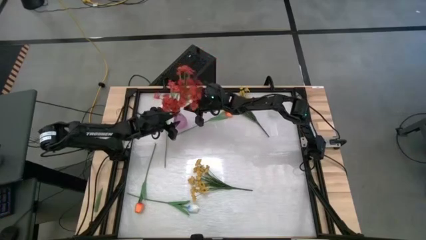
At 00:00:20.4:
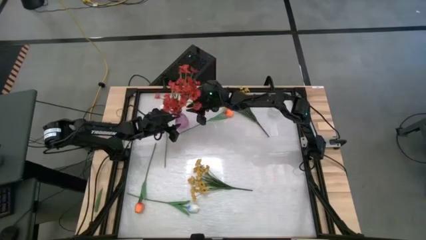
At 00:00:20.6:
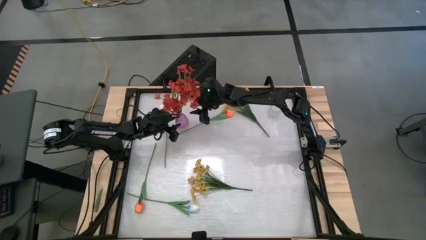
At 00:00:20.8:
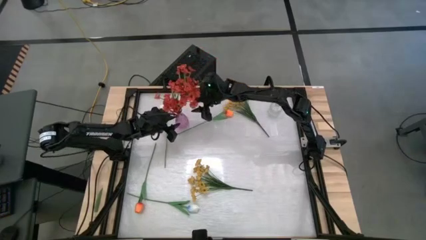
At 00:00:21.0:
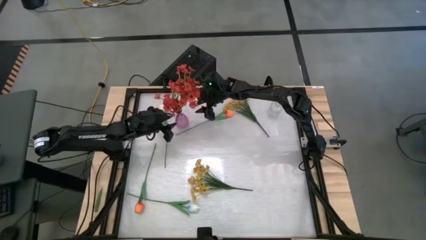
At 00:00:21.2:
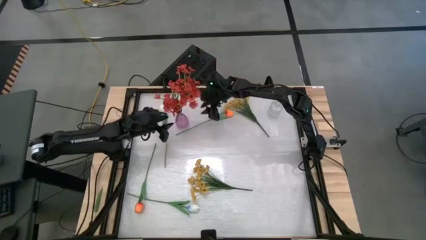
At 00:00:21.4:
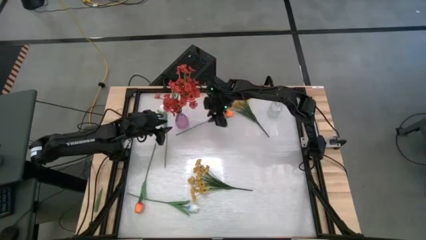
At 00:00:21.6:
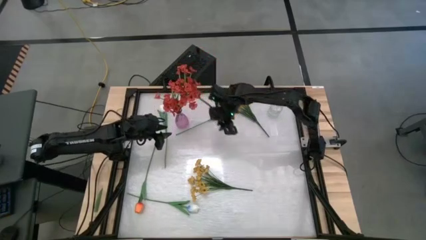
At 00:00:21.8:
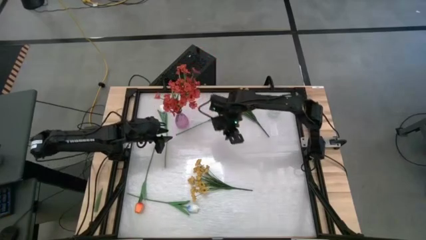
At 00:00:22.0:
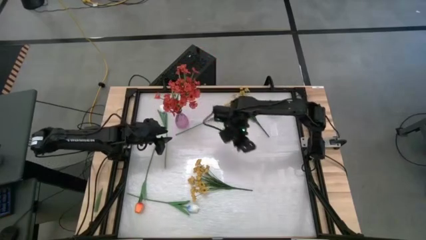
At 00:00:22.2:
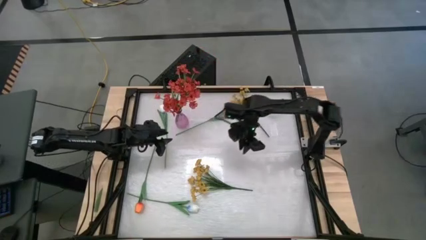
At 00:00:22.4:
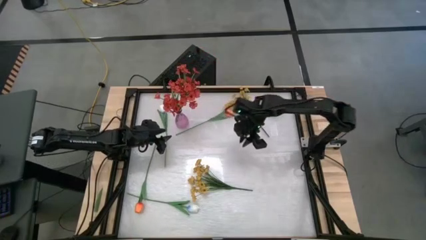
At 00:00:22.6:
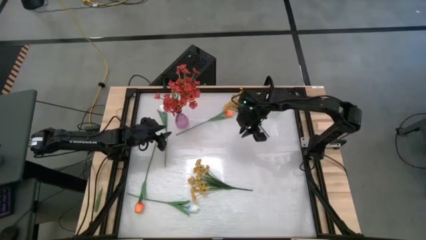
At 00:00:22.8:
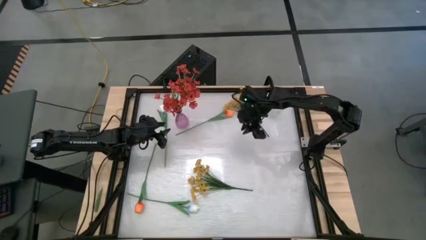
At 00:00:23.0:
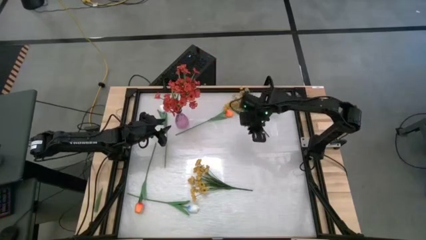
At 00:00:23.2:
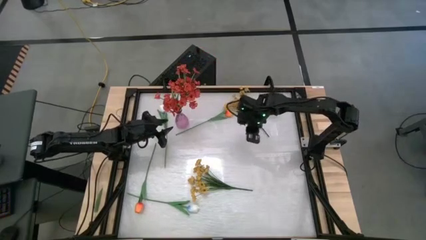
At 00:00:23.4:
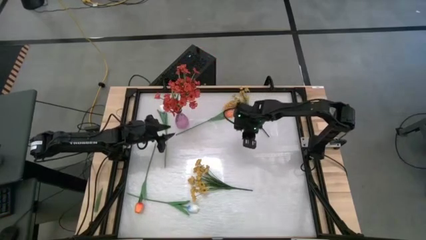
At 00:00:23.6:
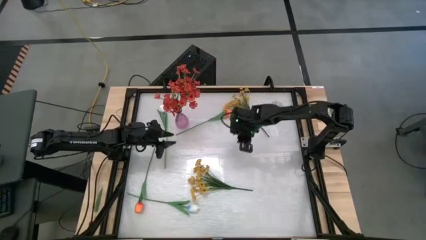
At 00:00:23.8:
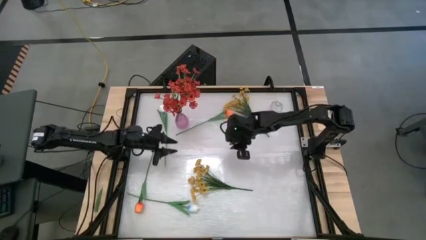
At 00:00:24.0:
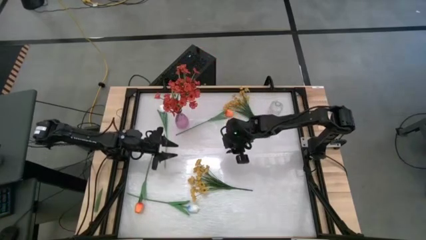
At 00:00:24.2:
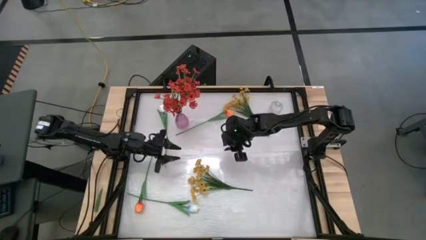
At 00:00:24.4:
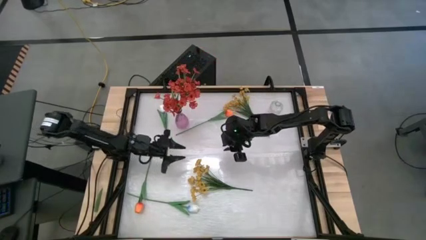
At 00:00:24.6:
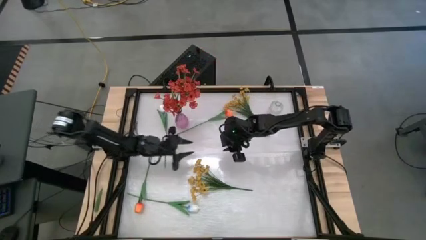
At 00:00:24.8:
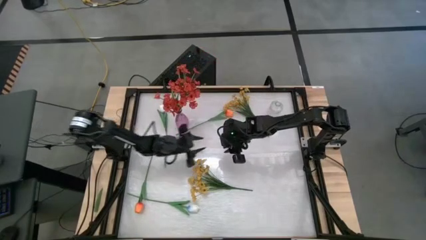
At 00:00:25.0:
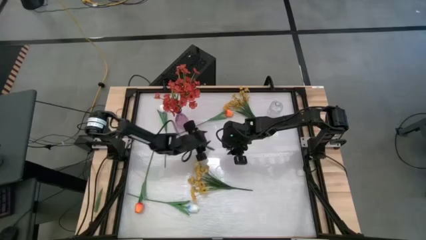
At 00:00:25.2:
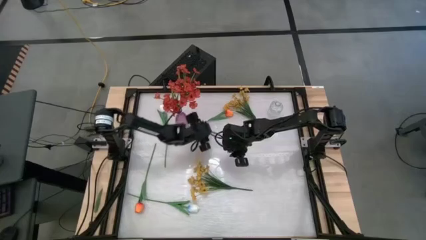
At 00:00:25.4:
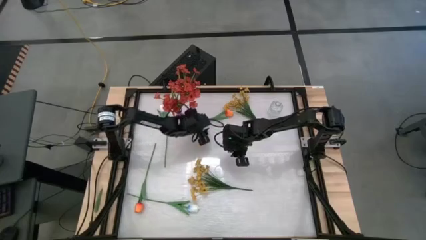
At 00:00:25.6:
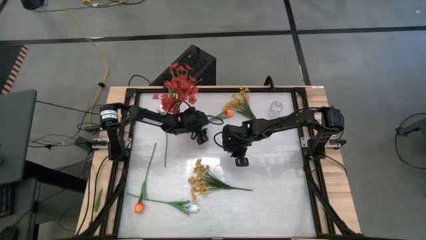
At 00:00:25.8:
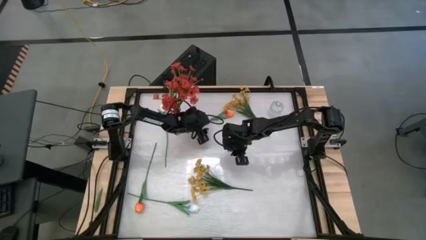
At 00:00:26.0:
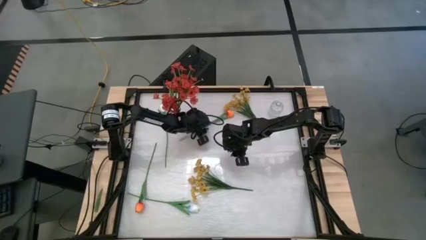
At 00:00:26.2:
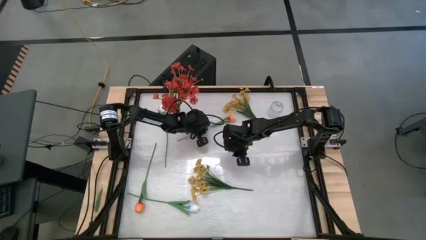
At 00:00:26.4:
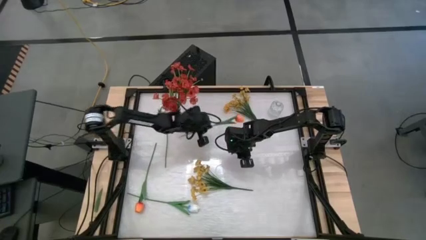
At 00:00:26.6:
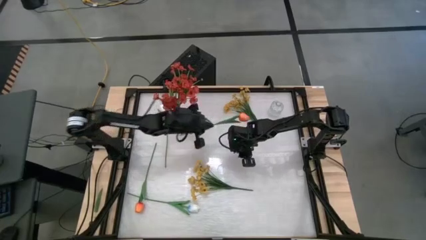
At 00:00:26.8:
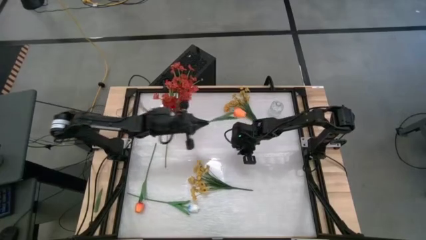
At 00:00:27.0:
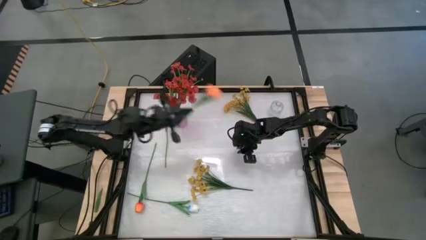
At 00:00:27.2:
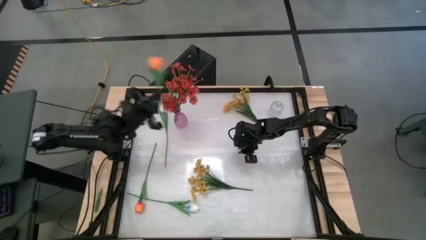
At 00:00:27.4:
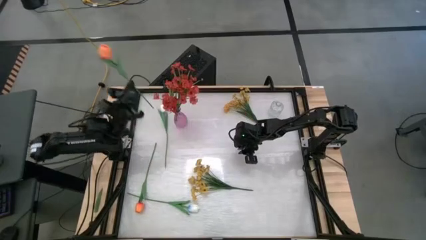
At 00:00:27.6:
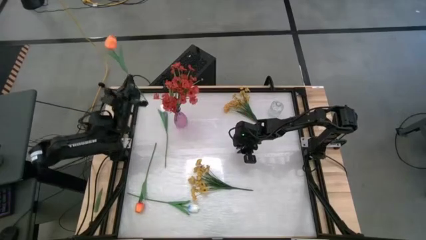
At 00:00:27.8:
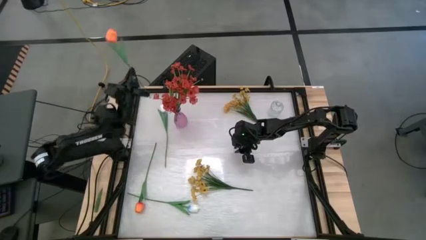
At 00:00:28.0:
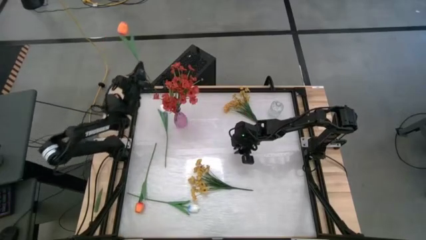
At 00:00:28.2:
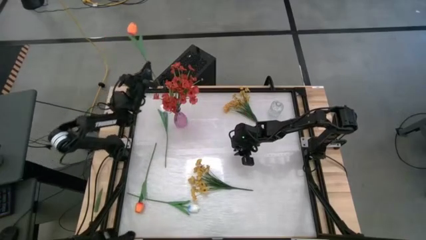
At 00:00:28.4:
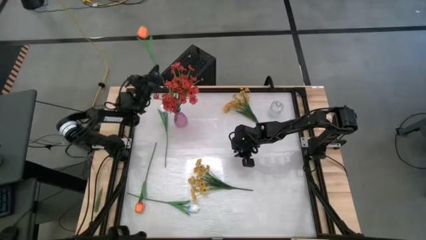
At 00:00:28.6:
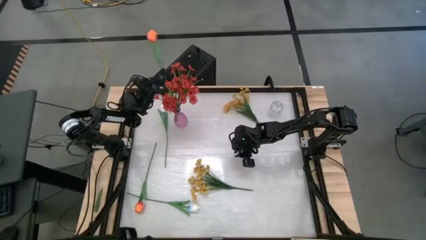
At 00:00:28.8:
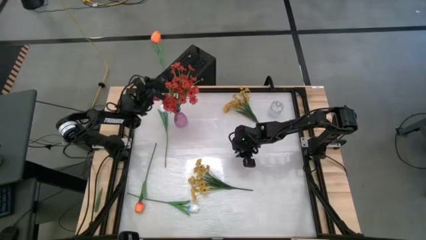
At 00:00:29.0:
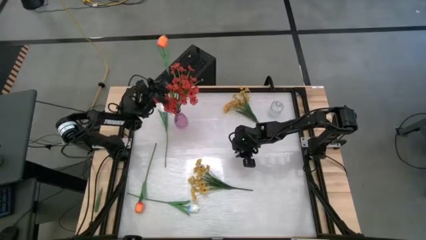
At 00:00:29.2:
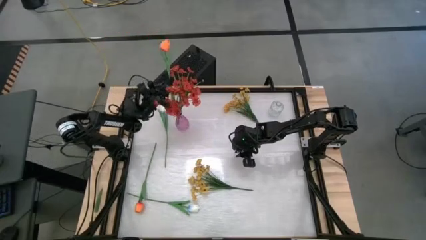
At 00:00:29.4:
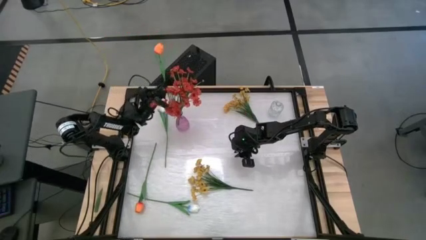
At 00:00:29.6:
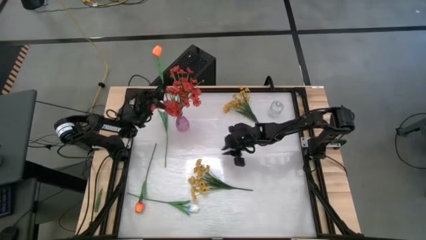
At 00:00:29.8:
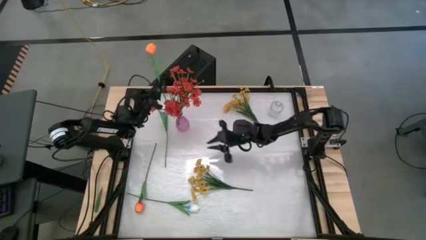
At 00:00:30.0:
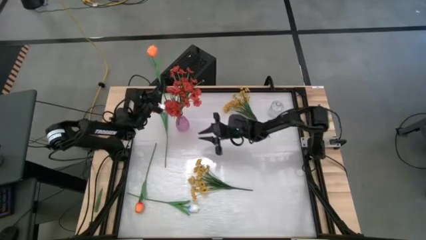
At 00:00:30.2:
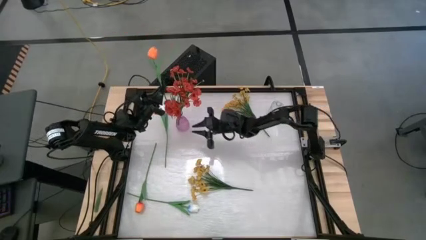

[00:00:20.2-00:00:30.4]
Task: Sort flowers into vase by color
Put the top orange tulip into the pink vase
